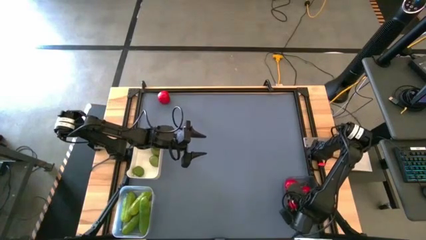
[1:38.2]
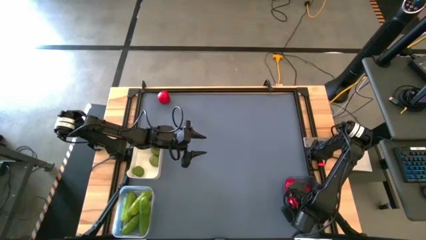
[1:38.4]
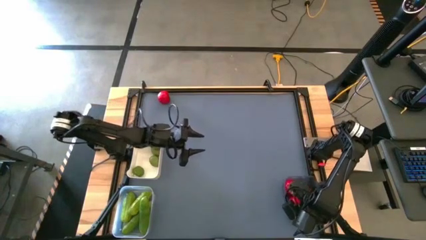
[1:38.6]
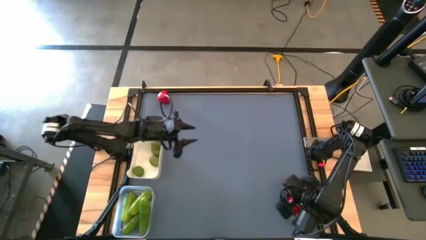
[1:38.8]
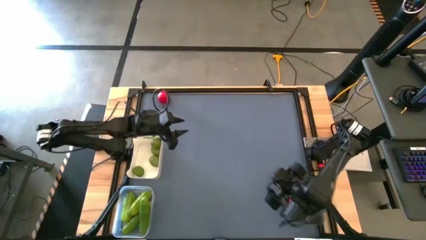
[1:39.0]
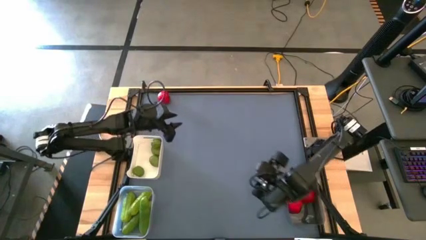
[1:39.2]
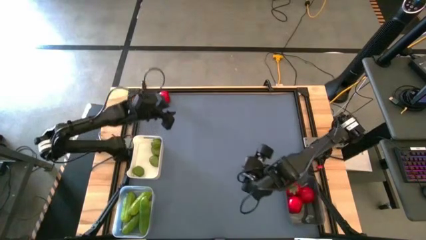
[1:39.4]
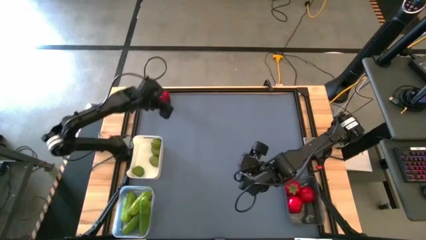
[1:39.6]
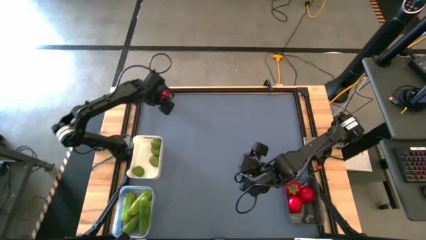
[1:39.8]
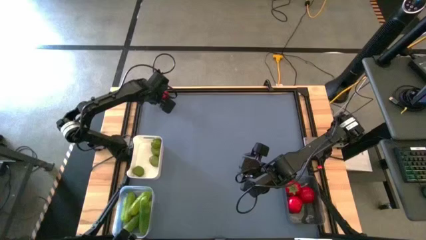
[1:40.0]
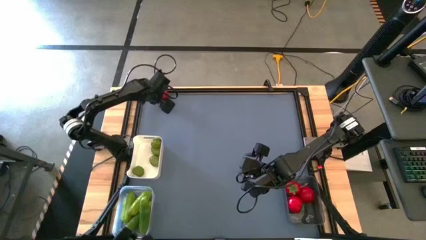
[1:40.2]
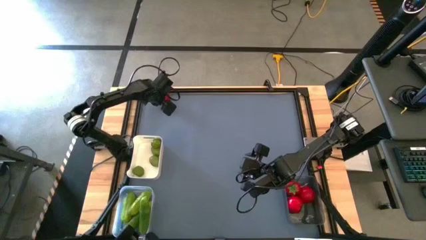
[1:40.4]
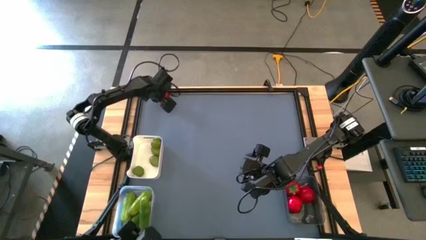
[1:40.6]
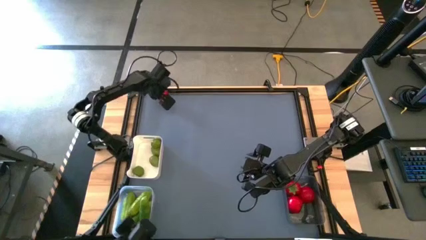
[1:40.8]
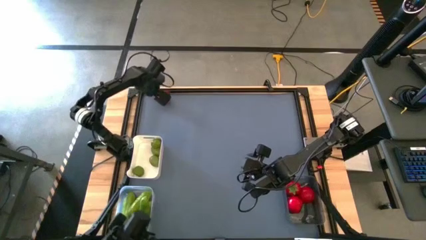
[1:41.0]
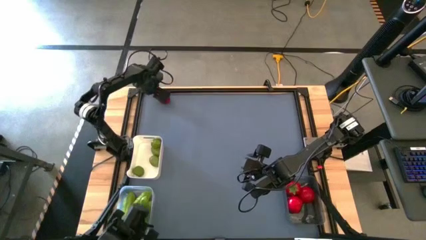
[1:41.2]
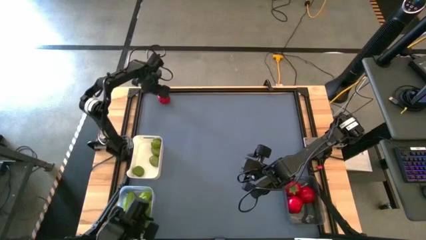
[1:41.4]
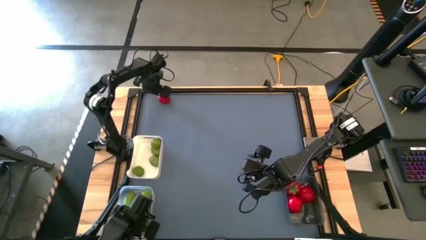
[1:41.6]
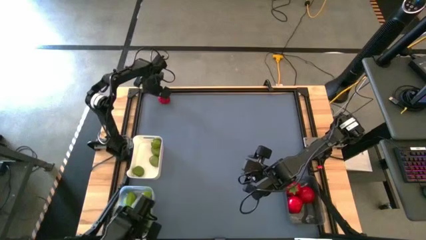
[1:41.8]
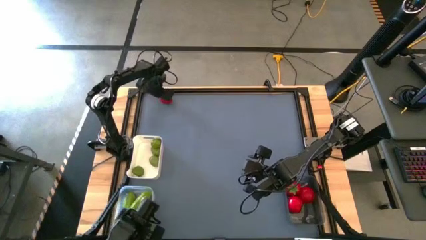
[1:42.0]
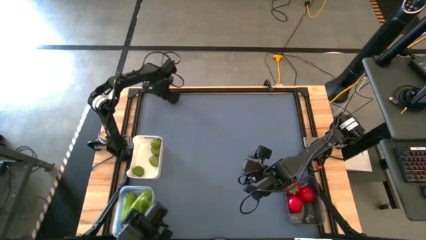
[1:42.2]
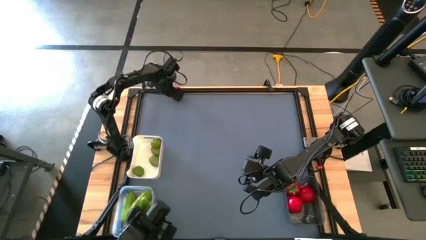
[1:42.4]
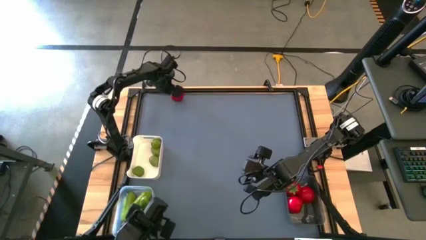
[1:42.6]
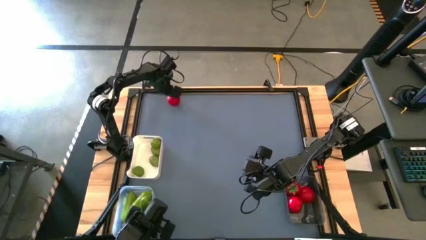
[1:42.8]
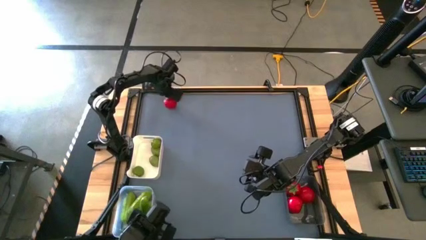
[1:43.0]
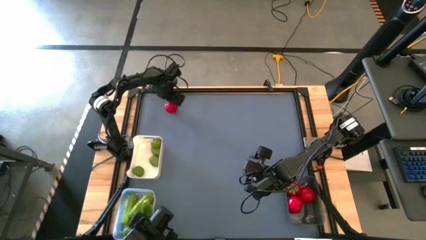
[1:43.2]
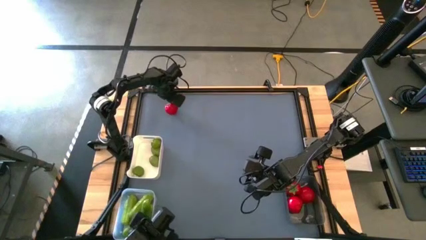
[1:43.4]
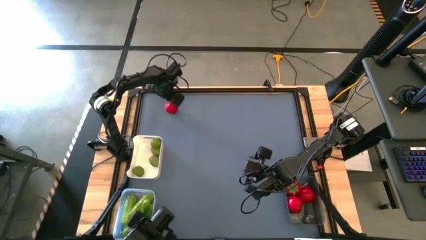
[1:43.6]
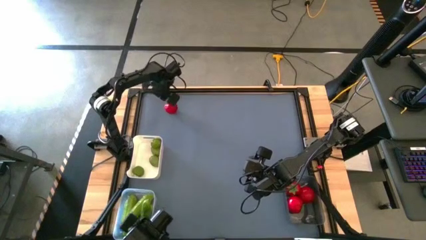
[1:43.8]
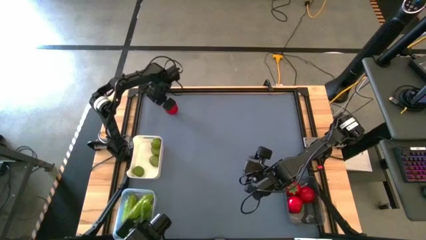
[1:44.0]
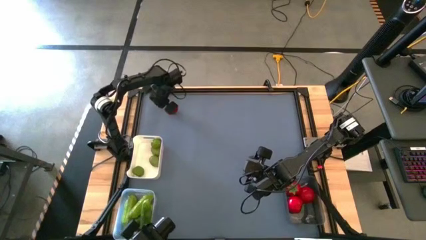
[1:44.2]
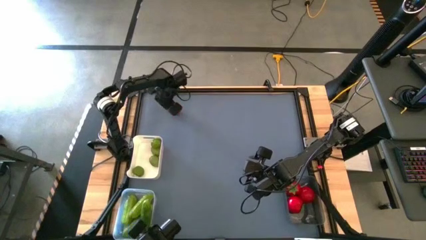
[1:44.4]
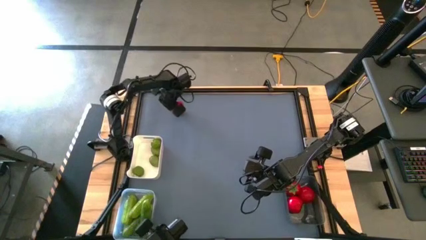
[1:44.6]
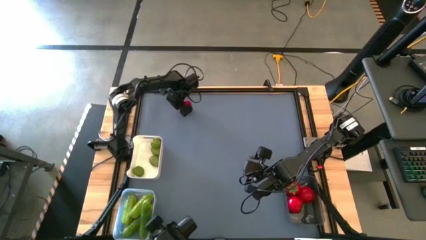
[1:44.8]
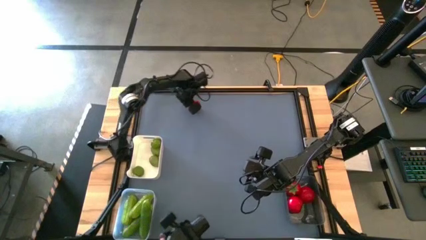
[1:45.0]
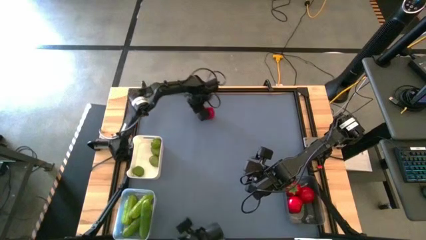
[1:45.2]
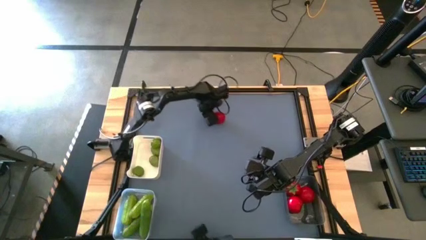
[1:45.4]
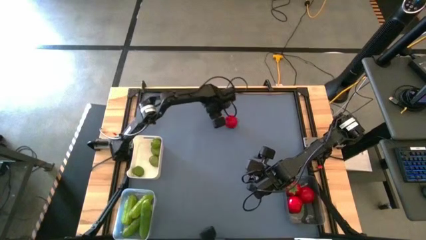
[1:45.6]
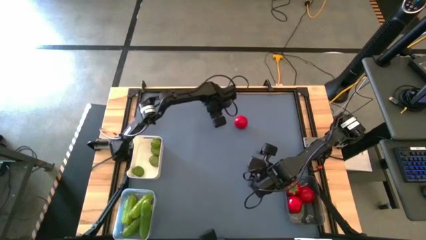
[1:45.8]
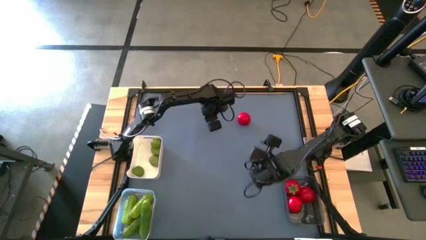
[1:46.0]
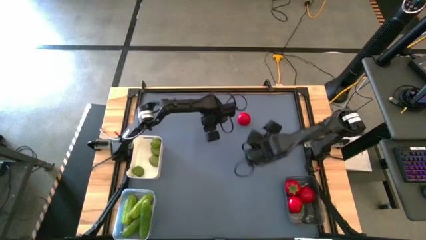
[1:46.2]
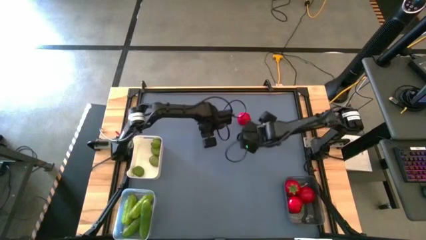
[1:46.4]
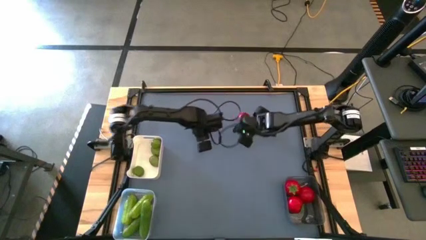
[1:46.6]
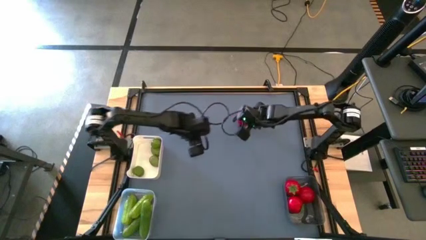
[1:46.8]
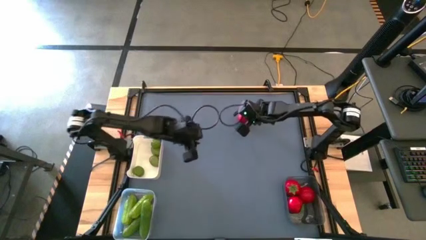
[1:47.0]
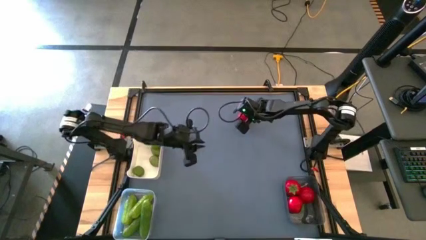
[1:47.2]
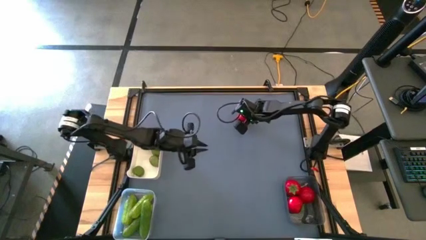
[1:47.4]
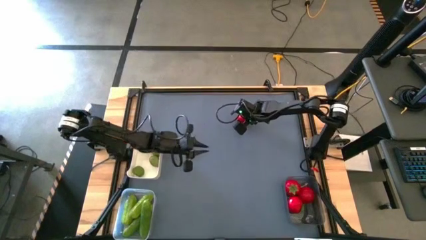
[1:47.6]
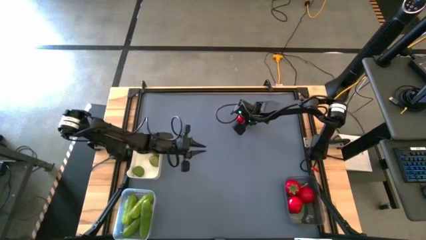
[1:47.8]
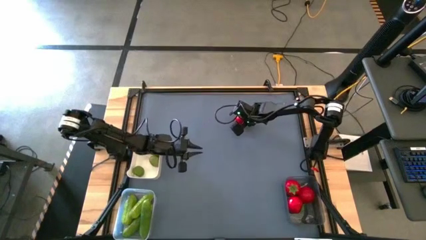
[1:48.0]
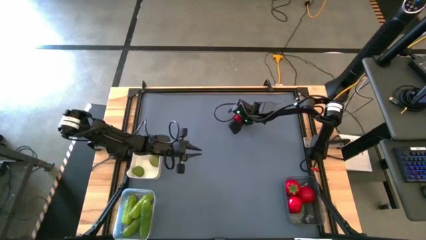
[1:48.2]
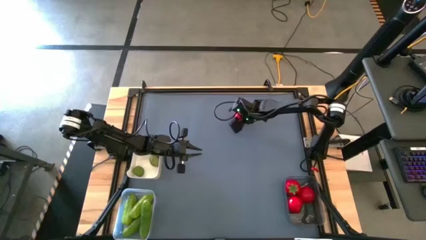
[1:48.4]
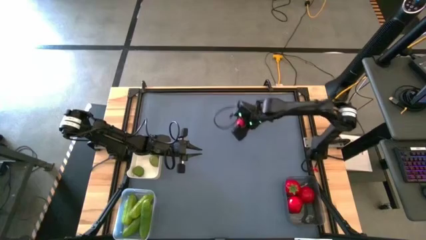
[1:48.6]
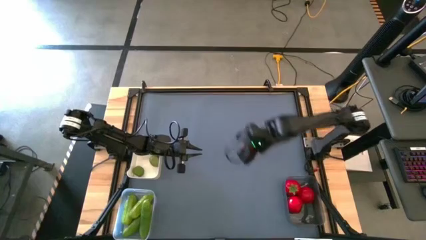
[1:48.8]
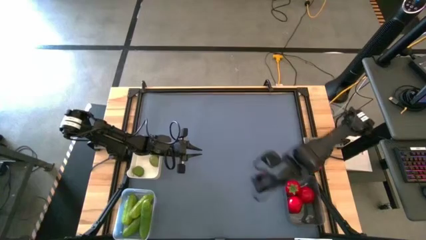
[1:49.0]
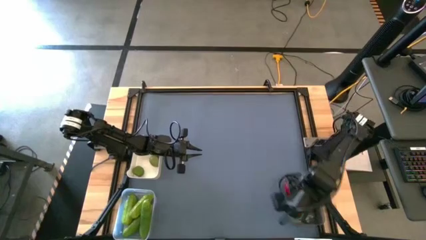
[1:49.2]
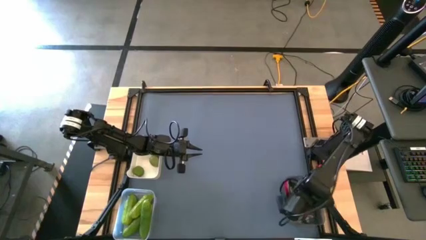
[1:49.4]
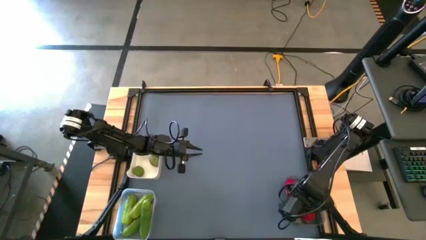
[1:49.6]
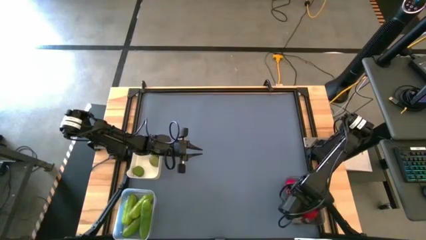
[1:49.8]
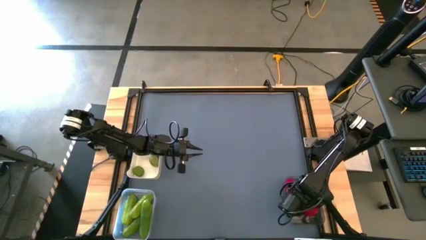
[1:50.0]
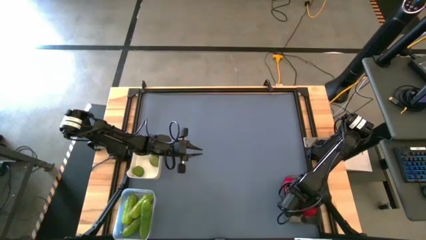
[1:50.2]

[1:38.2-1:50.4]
Task: Sort produce into baskets
Put the red tomato into the black bin
